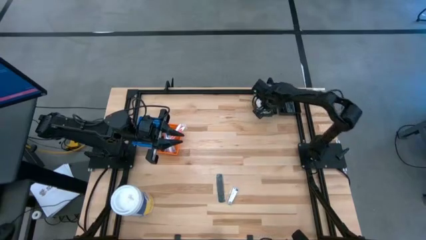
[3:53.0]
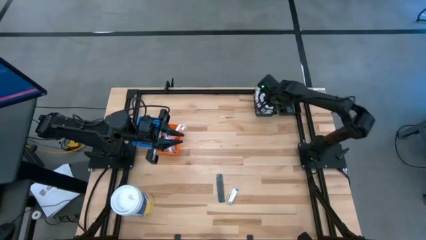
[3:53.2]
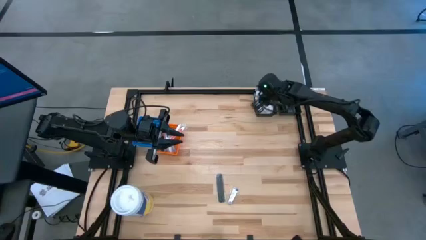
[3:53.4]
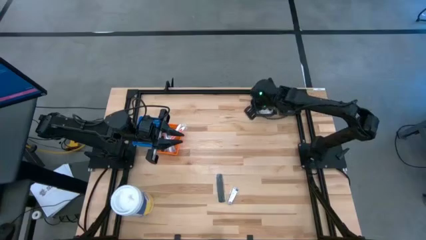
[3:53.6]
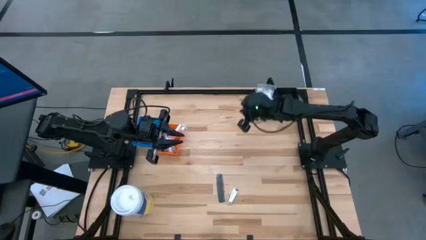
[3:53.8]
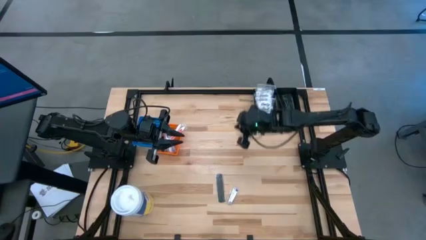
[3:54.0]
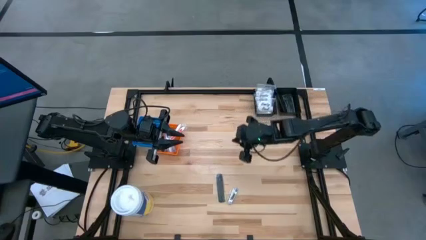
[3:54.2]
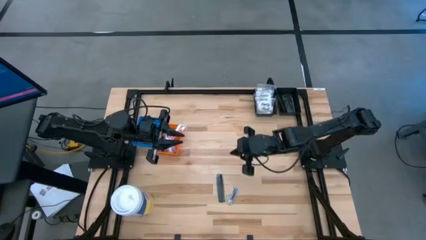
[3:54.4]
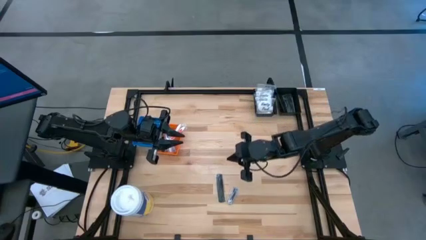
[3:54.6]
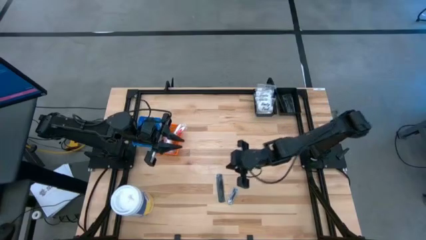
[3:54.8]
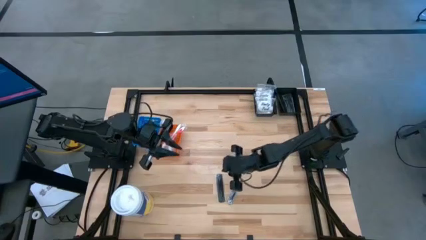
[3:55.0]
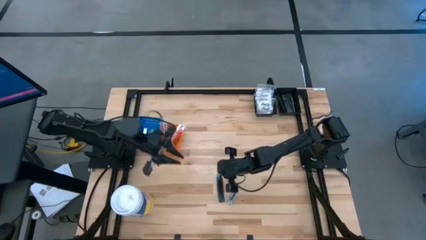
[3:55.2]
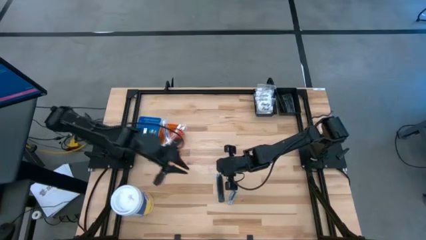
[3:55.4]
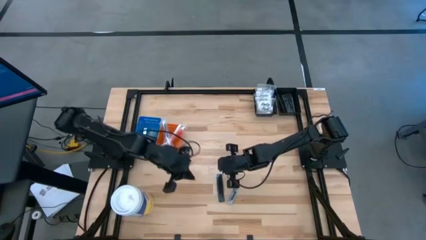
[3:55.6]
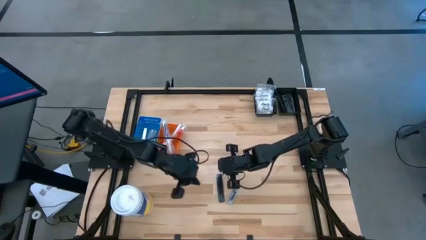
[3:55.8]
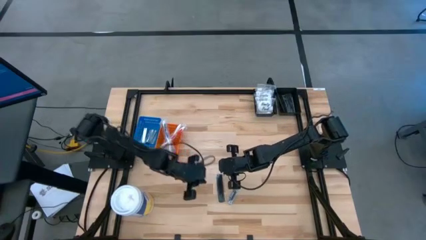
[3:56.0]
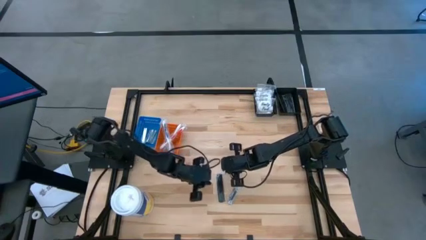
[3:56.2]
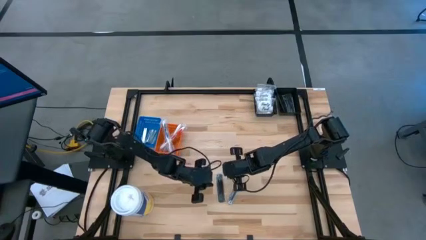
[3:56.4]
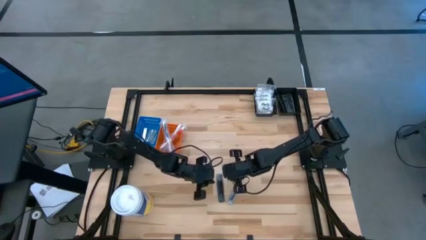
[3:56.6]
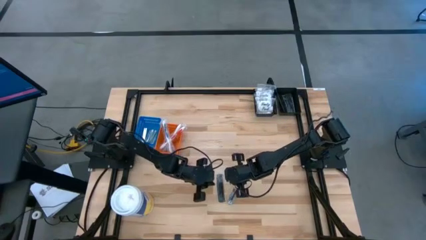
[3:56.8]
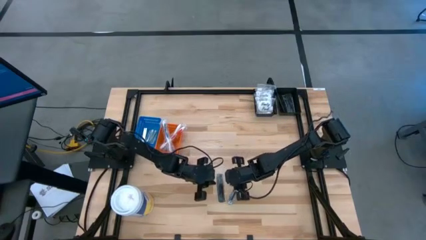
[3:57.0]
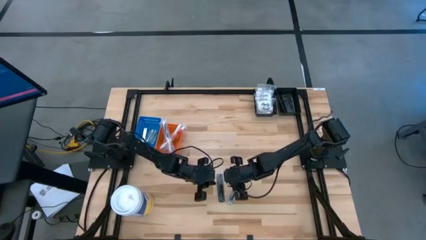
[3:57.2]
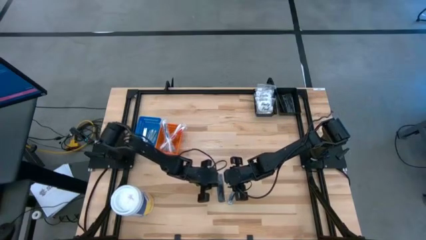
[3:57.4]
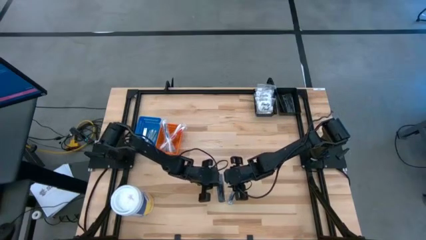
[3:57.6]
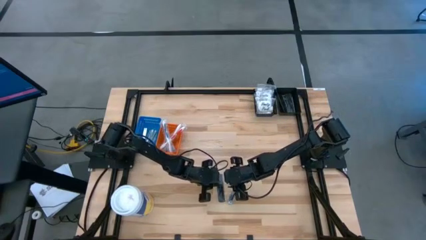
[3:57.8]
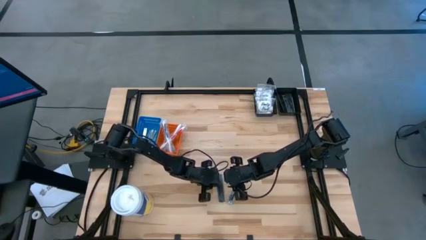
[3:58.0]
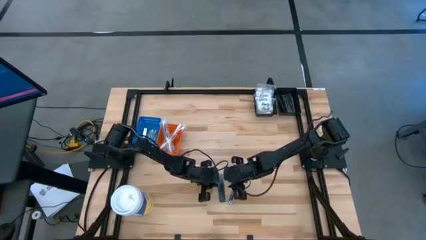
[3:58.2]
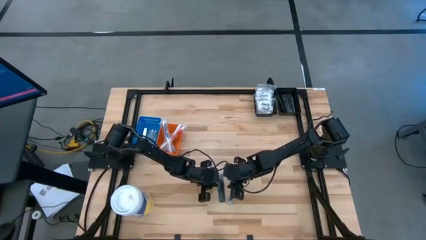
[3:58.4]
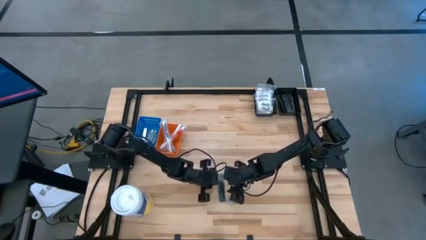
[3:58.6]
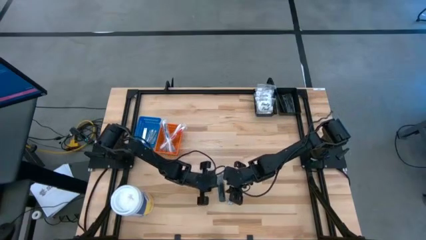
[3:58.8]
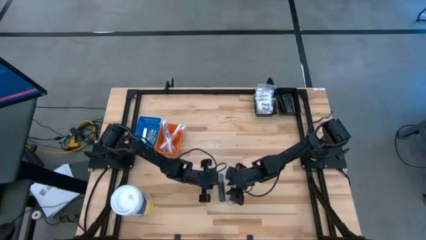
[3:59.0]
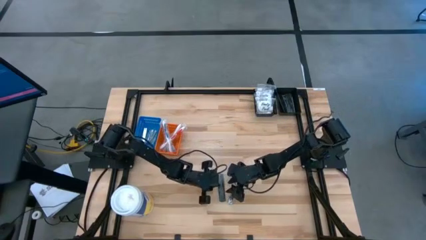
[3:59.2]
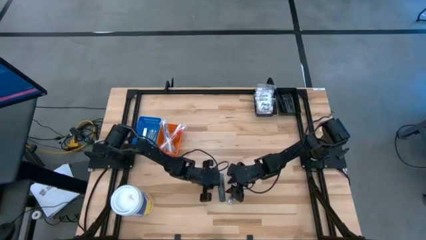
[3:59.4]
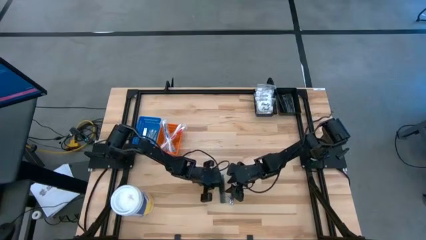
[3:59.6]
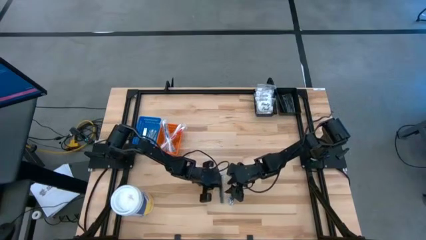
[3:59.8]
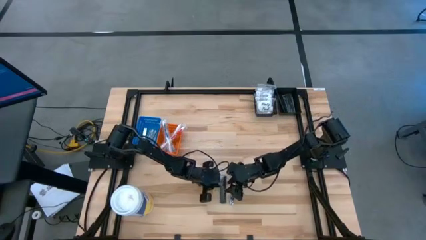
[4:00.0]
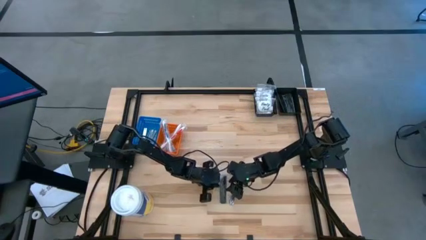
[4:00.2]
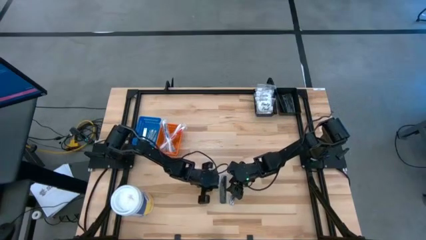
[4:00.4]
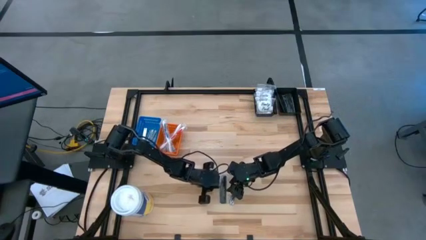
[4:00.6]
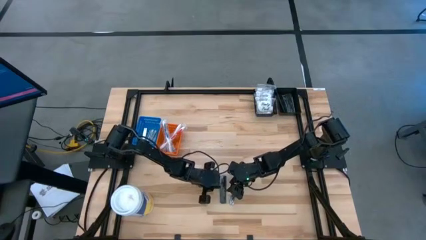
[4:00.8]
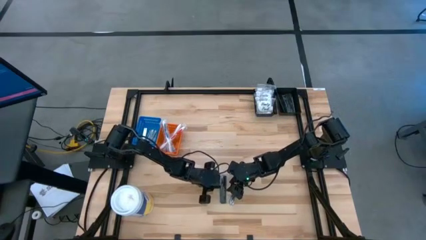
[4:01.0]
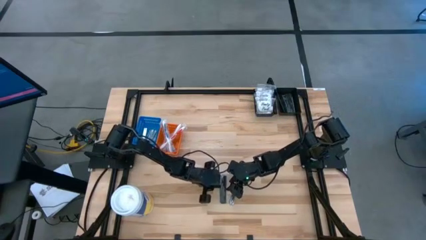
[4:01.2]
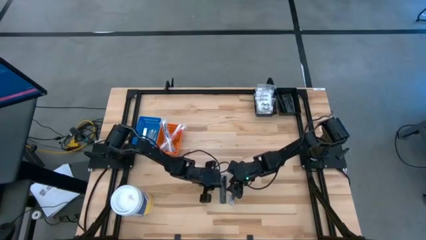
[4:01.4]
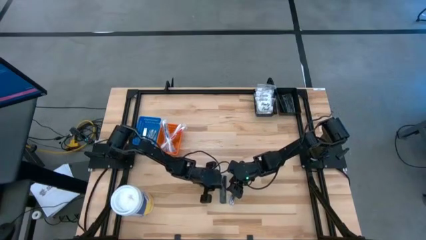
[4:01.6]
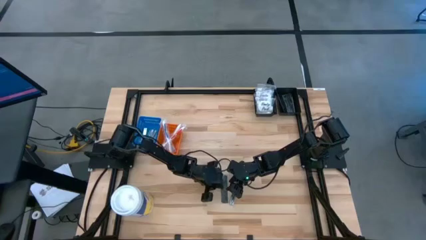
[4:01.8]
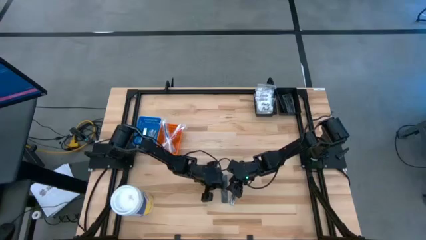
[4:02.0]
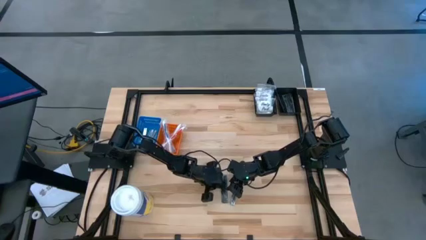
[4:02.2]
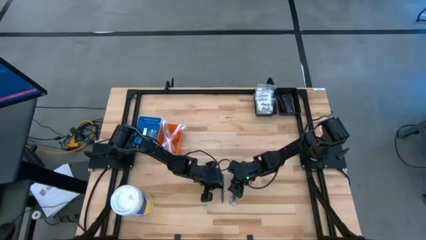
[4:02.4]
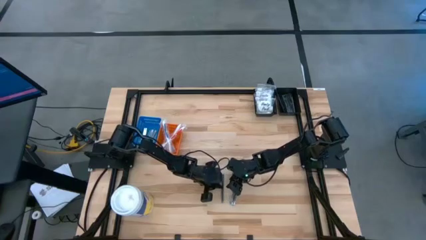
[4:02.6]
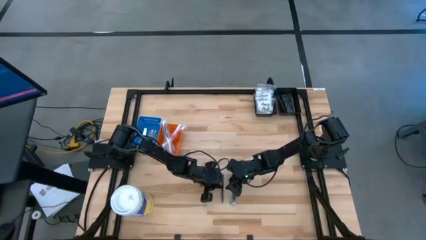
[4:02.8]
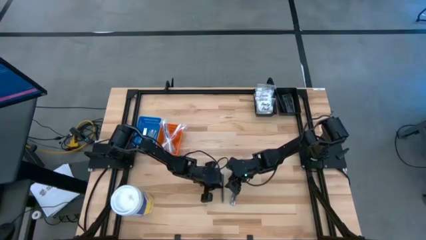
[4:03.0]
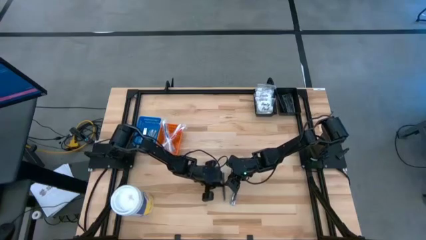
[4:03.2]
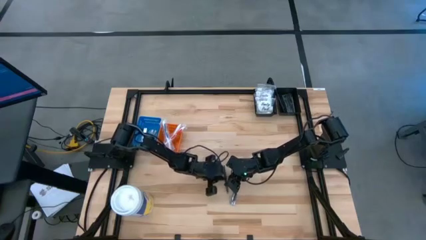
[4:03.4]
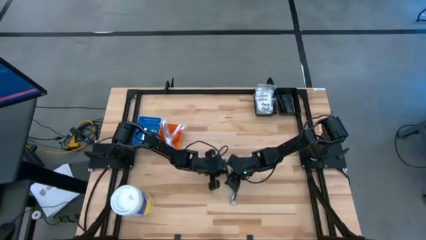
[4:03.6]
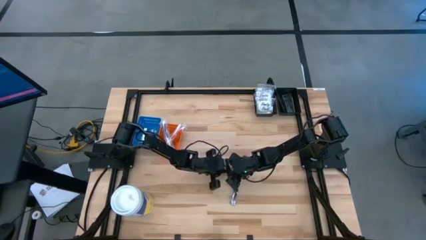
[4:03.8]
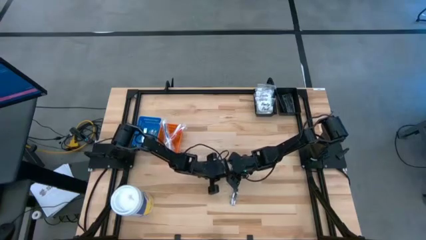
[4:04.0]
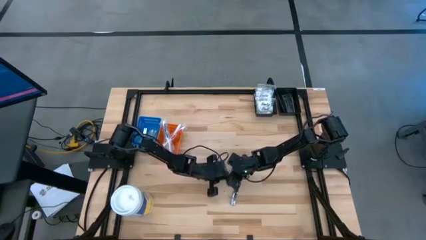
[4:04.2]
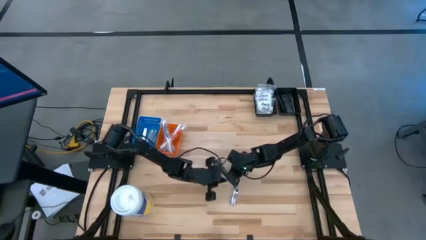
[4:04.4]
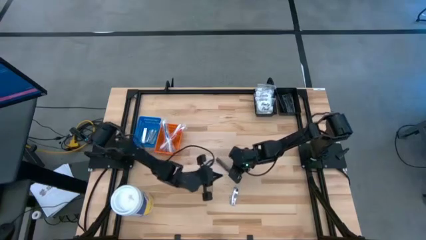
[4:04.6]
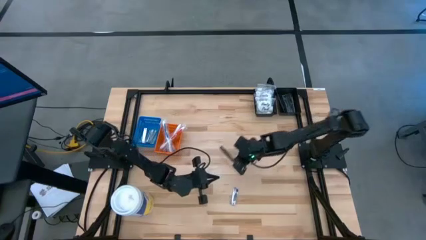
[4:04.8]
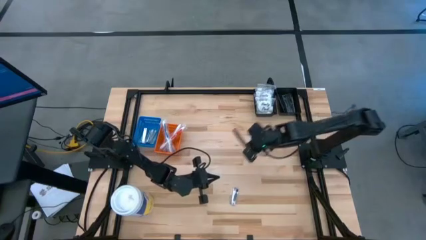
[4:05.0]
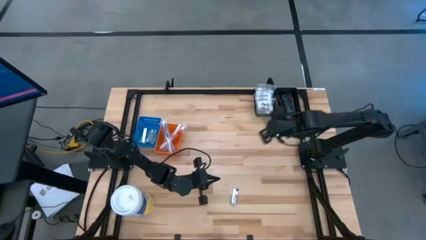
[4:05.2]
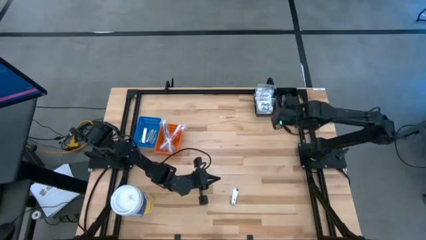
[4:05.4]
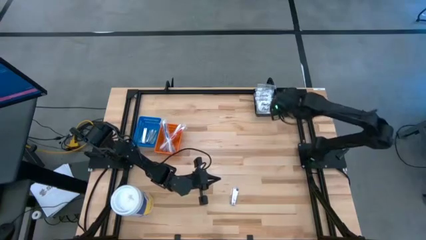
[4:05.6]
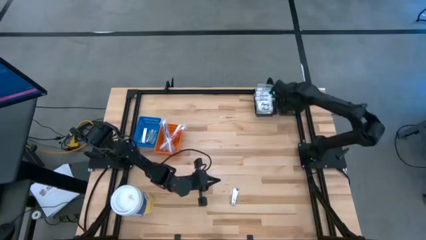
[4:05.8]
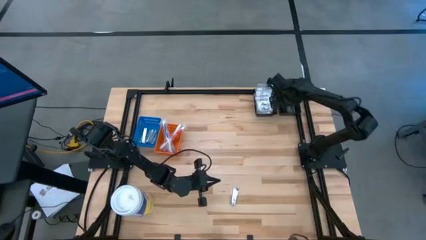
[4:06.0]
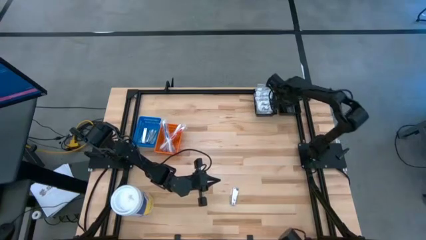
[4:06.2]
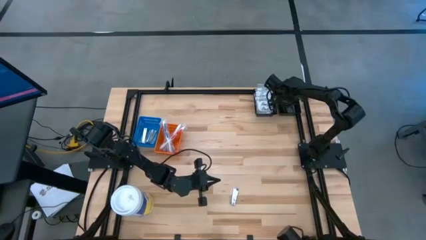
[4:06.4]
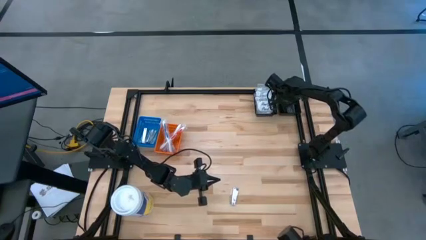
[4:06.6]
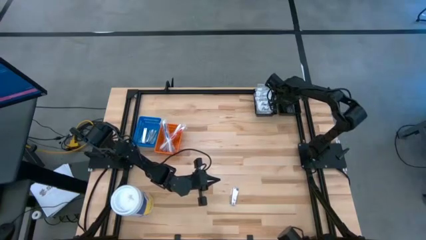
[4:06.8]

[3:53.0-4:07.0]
Task: Pick & Place Travel size toiletries
Put the black comb into the right black bin

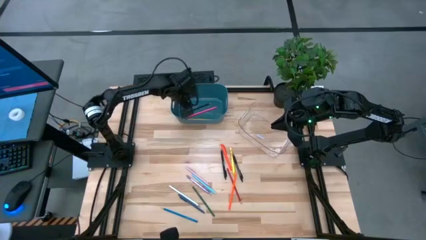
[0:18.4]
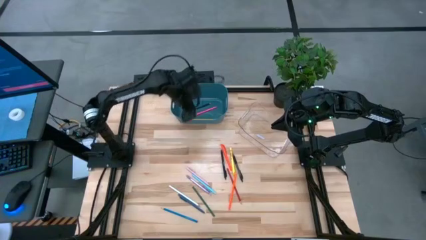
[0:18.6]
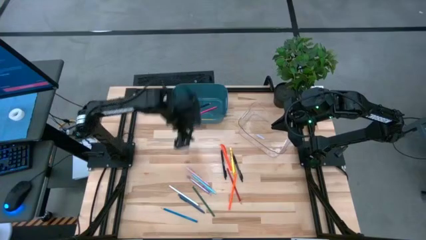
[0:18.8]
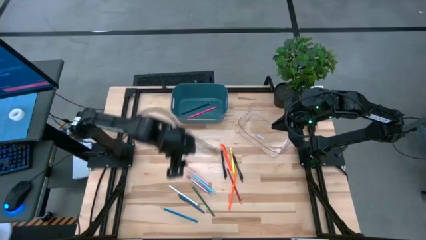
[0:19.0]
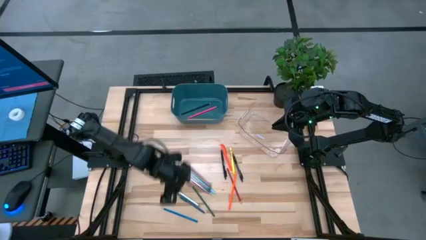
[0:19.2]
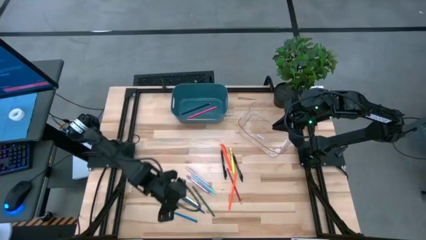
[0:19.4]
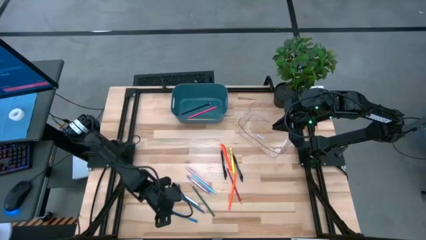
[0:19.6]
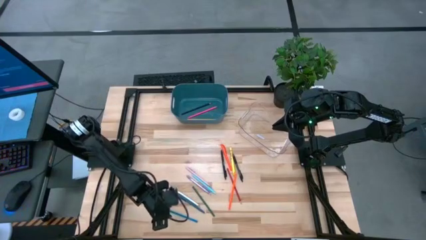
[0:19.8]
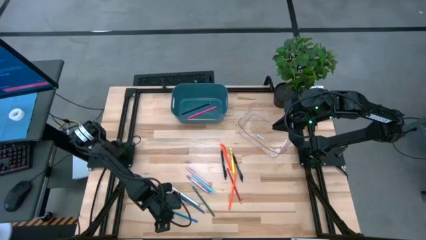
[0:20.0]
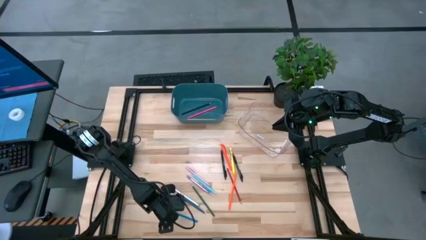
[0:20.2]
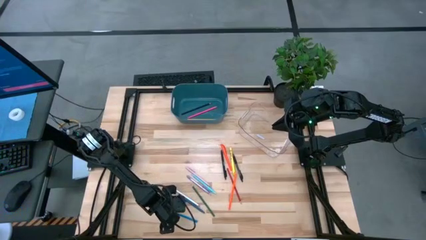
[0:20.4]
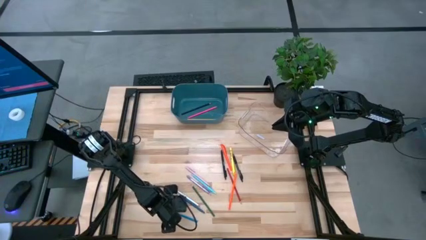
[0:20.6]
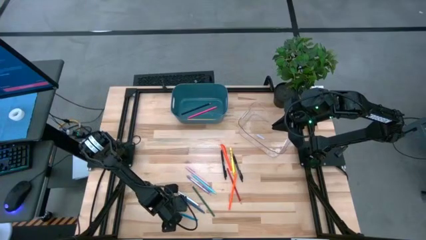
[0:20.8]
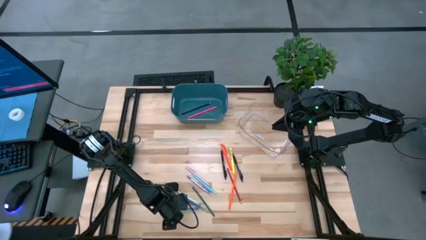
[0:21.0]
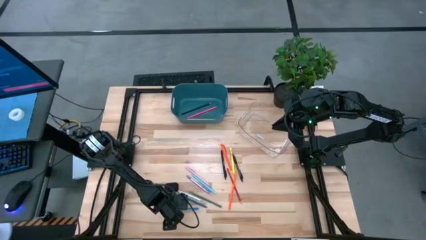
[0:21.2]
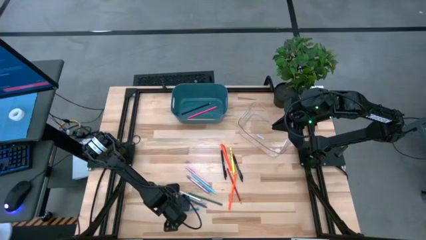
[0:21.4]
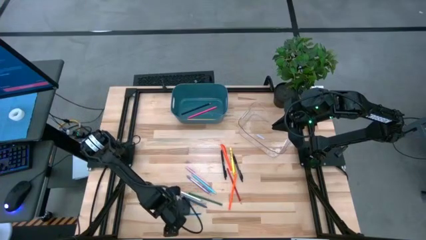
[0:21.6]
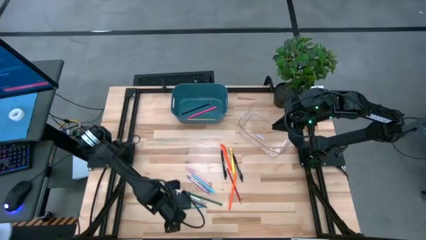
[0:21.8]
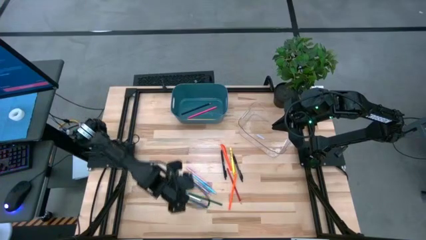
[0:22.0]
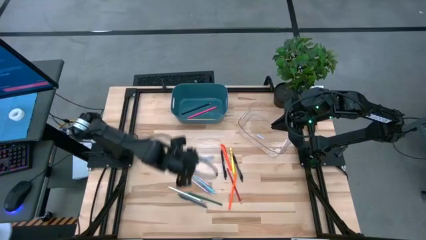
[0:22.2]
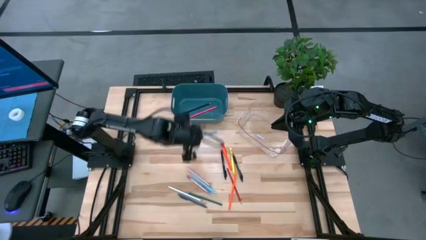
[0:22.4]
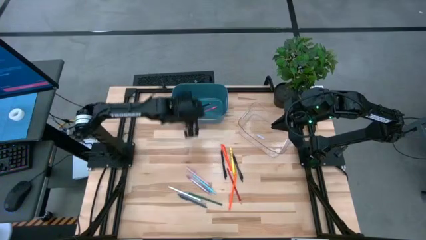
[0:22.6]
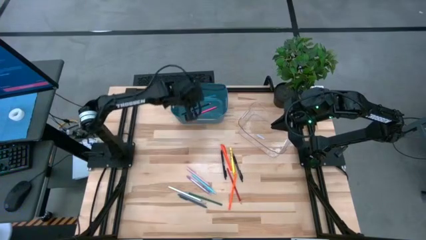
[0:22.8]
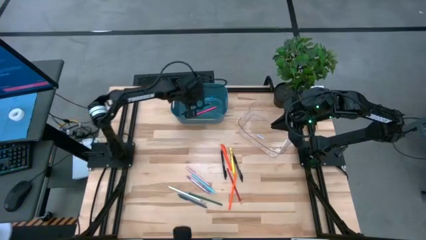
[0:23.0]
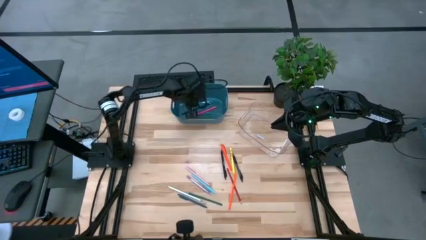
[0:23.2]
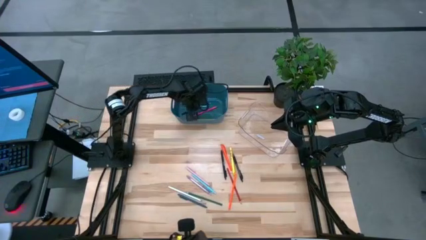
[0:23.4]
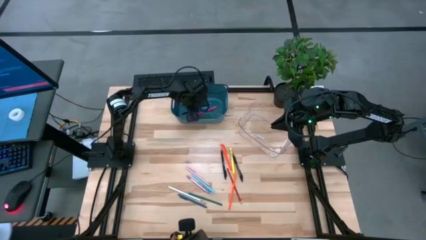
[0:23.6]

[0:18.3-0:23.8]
Task: Sort pens & pencils
Put the blue pencil into the blue bin
